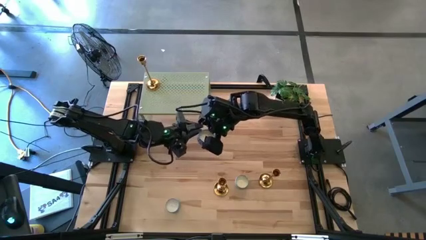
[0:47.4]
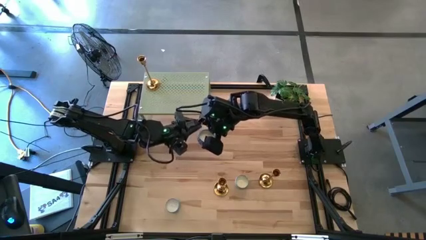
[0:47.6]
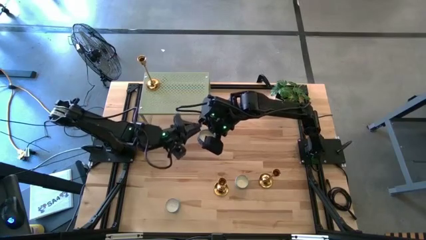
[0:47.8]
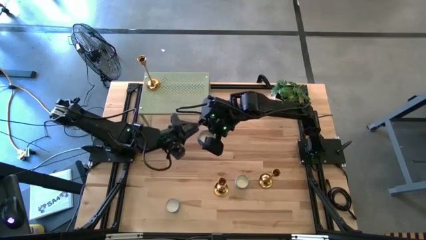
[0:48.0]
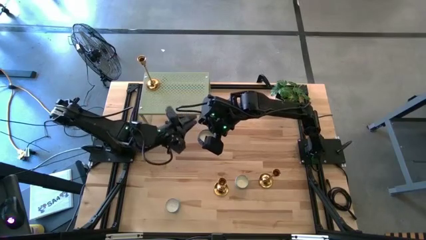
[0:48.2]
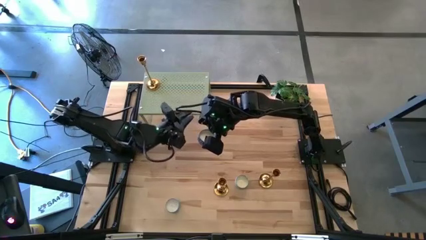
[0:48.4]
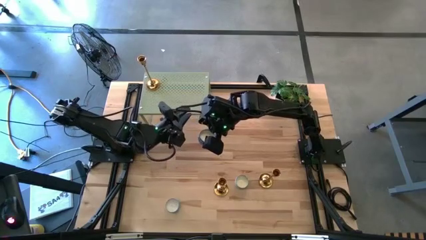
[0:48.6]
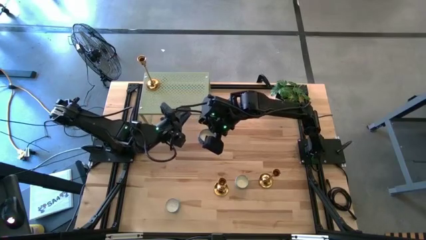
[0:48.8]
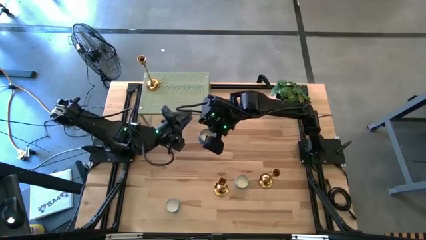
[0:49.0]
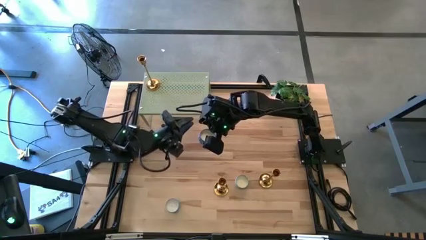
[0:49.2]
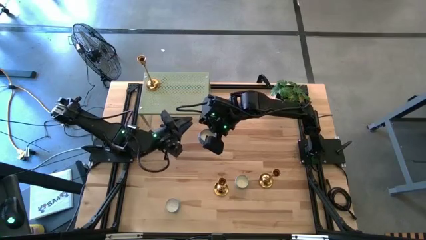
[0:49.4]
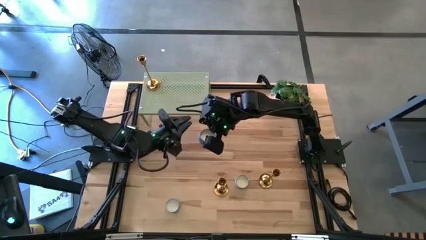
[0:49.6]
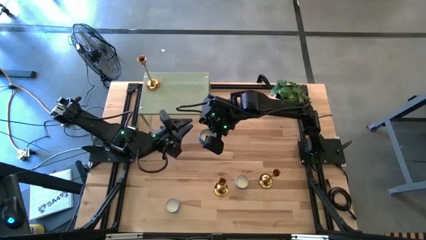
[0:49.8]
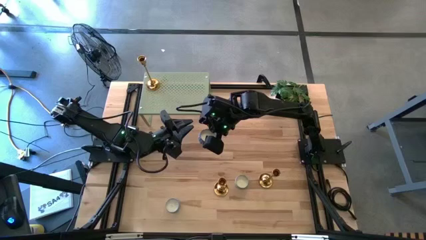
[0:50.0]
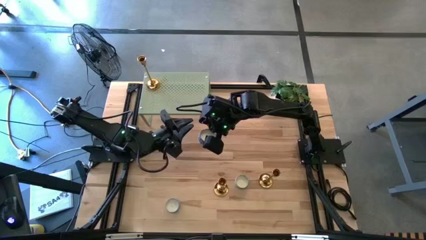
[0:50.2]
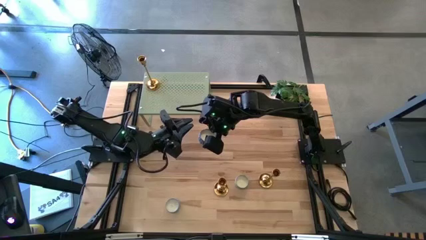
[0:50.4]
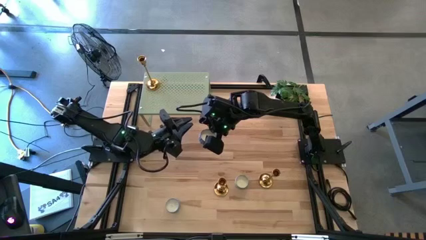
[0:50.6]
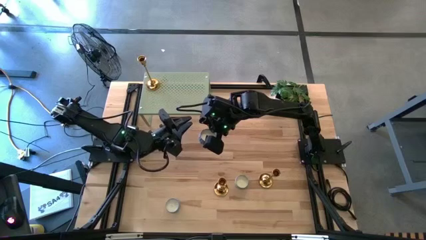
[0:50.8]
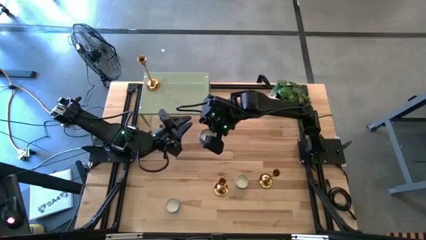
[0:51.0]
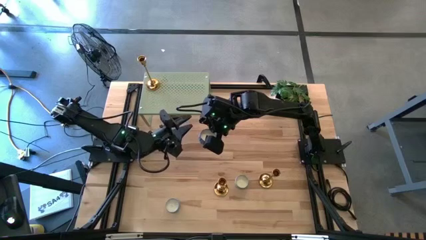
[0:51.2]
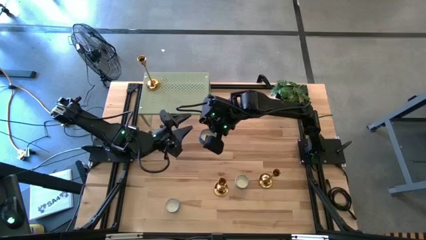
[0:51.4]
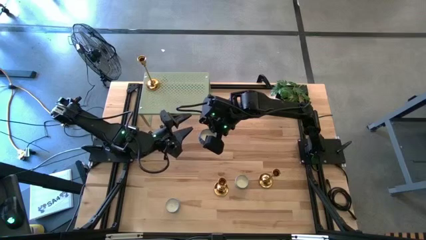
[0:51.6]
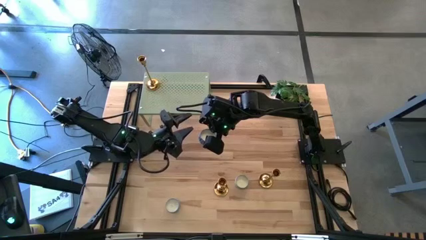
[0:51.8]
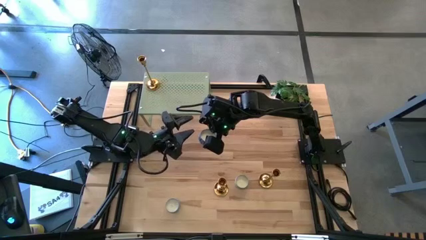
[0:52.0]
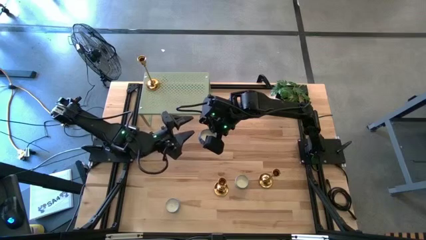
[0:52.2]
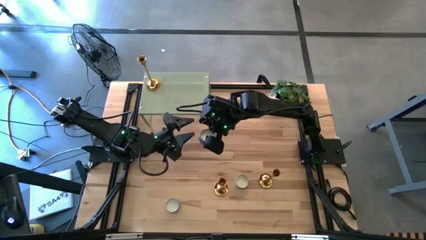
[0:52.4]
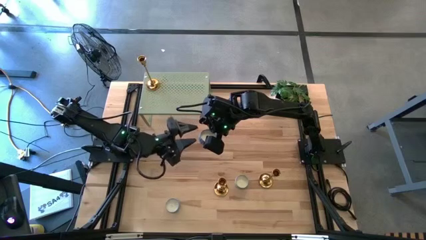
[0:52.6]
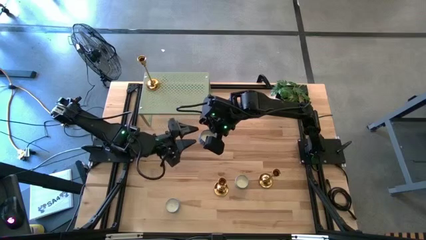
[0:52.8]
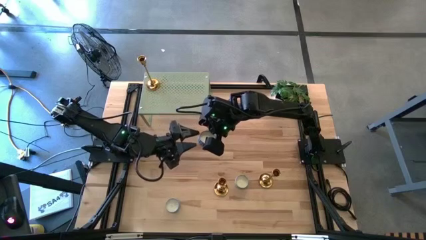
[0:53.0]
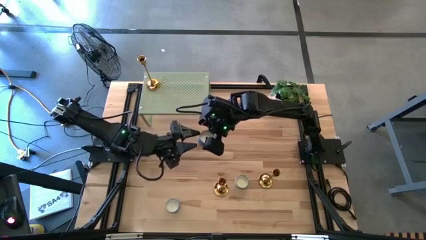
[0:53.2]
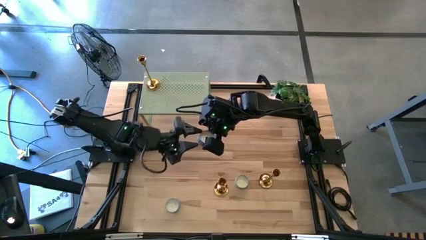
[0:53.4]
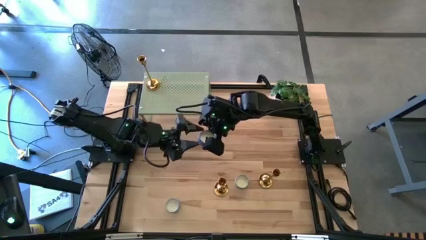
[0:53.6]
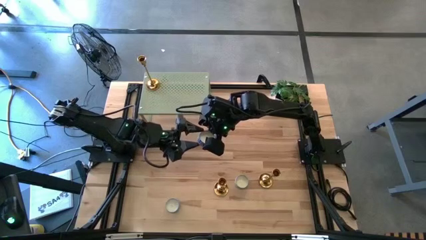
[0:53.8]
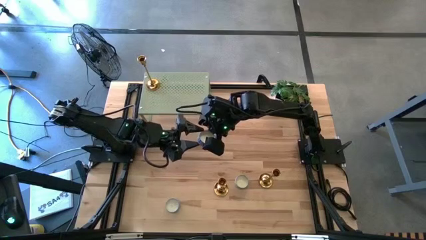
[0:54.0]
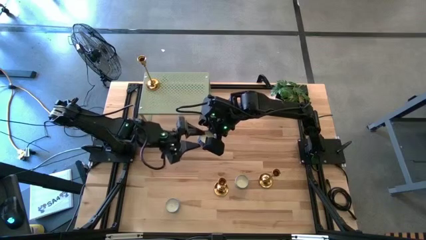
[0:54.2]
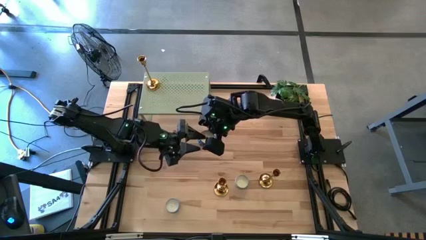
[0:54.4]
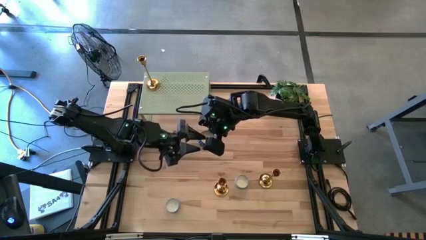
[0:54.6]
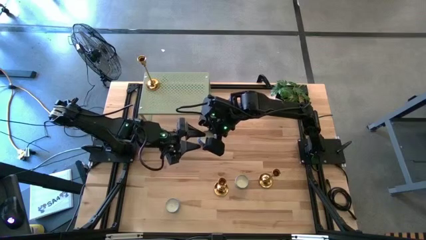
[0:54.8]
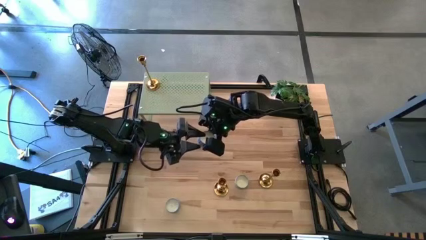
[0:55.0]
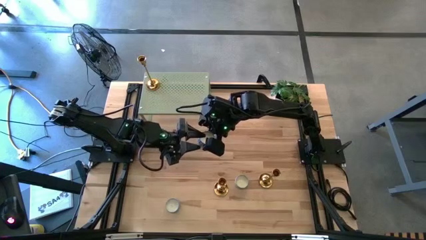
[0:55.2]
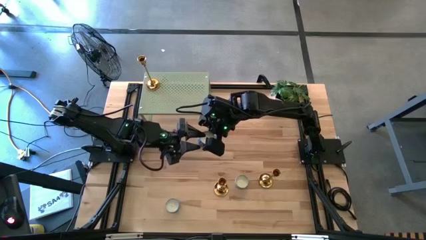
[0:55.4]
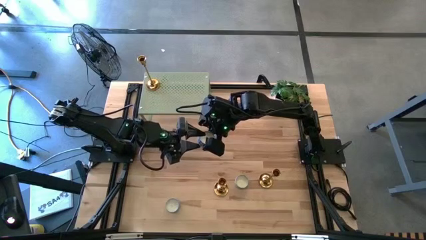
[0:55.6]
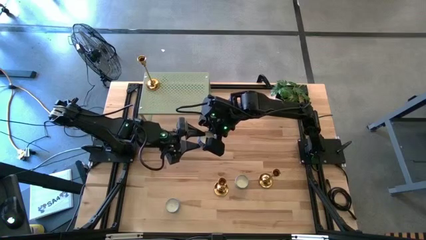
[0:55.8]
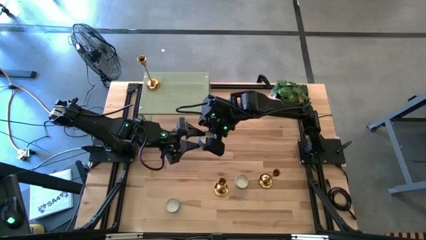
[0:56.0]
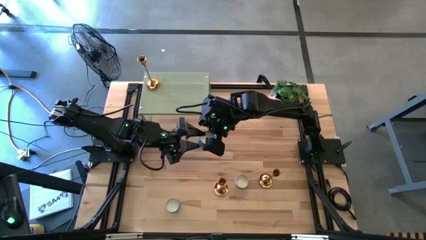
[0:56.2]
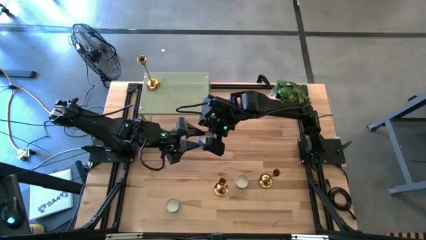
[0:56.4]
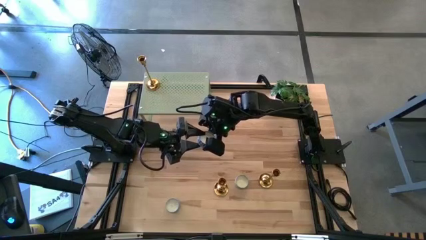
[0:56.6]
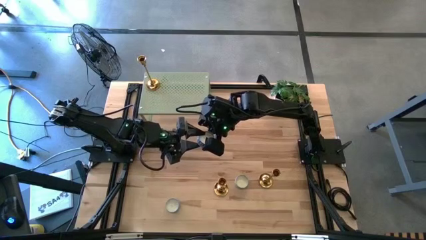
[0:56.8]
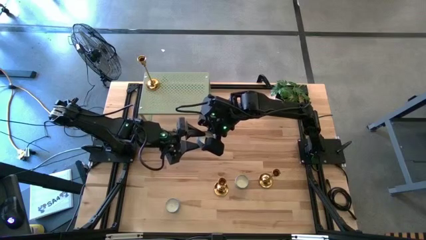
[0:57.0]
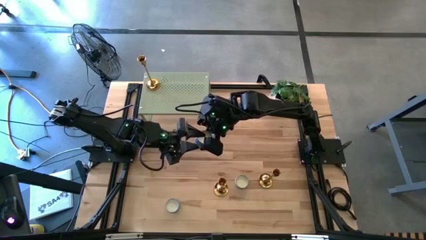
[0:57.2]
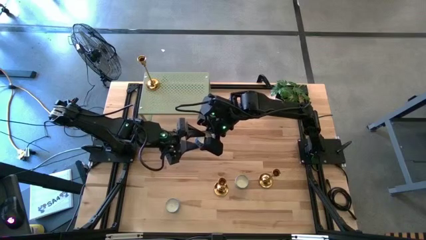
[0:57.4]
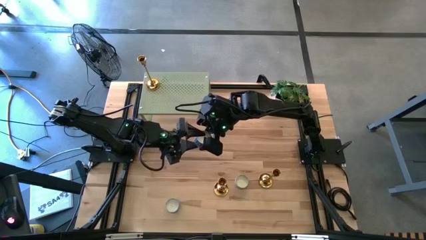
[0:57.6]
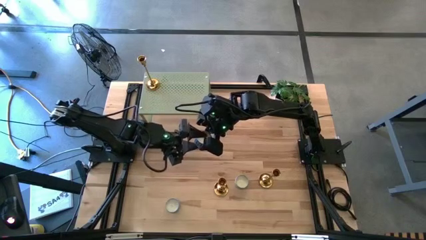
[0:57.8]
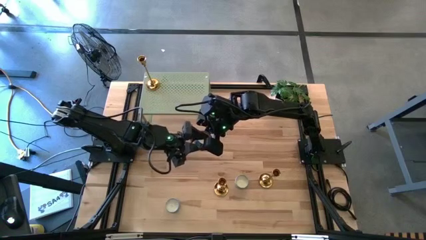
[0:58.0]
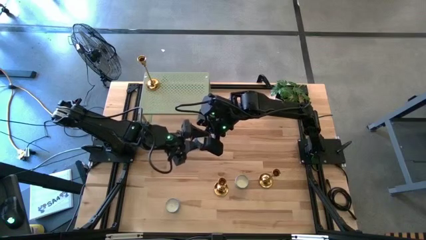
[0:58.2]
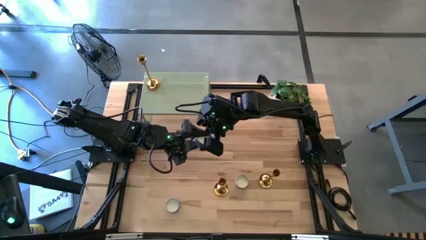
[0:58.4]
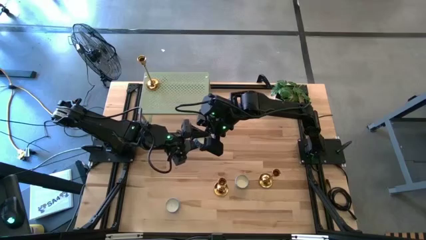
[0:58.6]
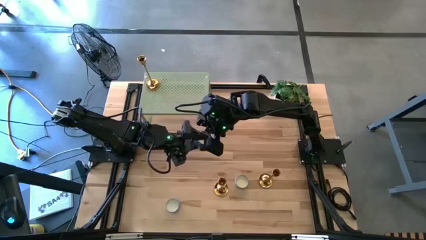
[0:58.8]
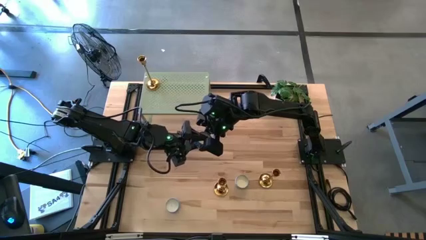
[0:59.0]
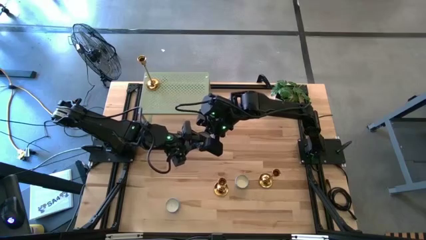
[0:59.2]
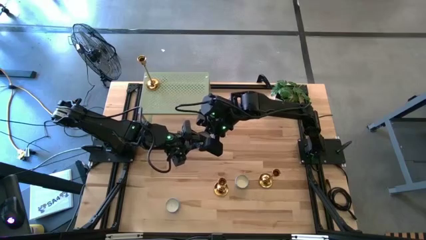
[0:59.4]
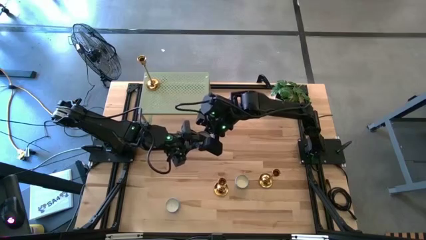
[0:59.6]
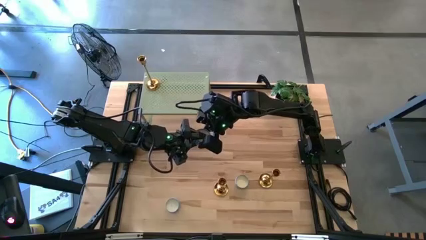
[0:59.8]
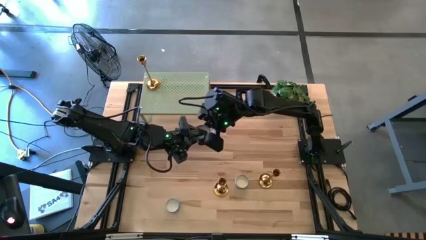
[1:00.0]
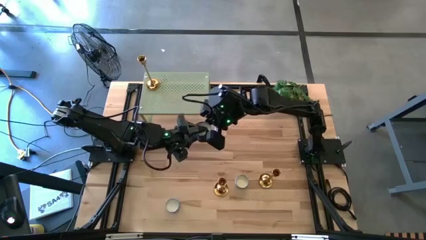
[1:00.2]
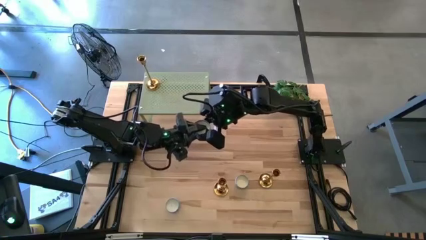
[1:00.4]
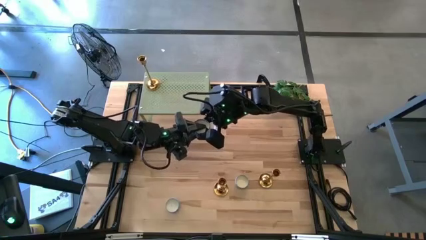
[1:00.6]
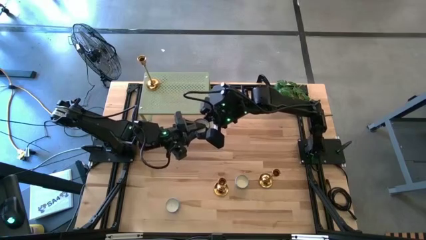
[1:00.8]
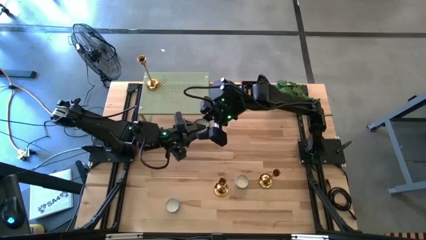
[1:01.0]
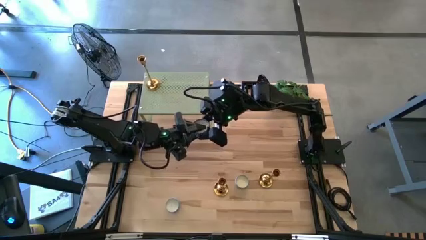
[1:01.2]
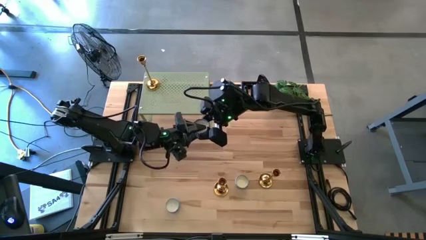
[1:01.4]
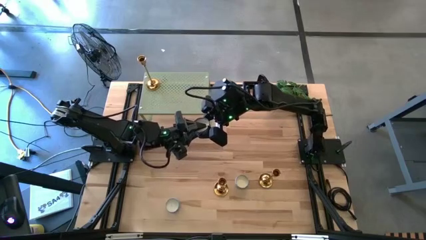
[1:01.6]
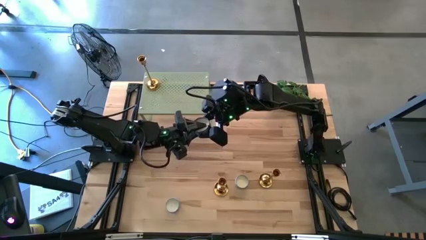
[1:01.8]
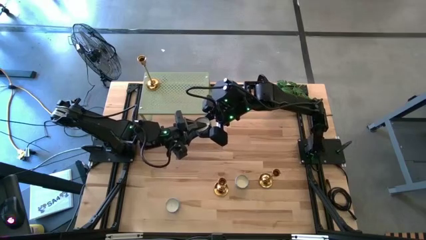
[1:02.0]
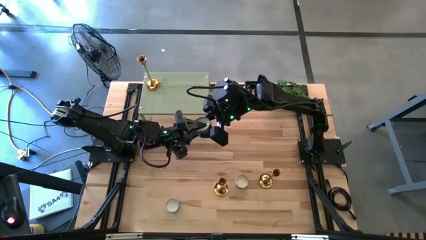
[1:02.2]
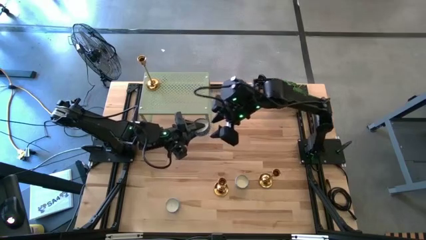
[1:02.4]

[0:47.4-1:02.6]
Task: Pick & Place candle stick holders
Put the top right blue patterned round candle on the shelf

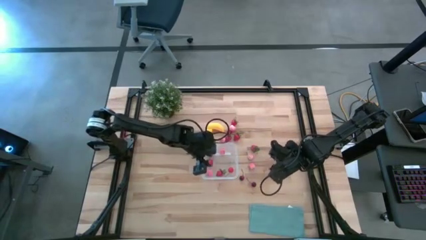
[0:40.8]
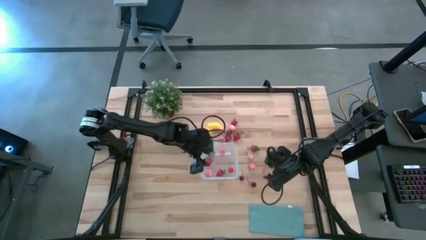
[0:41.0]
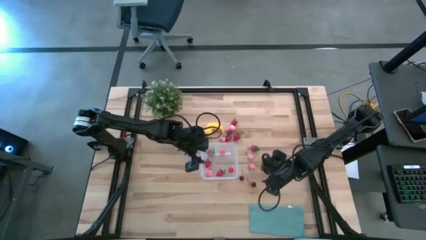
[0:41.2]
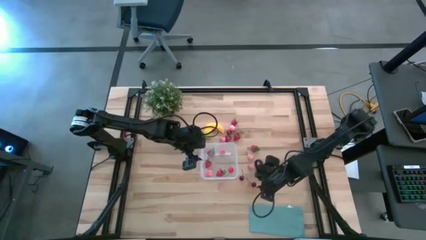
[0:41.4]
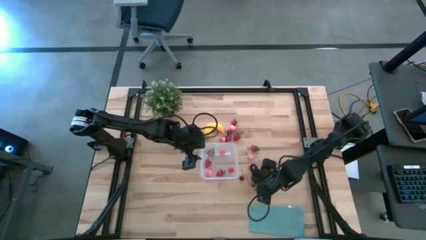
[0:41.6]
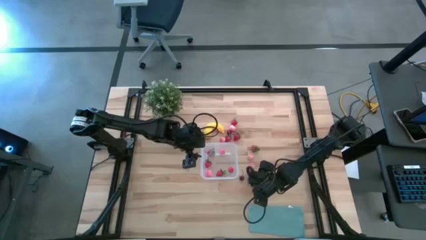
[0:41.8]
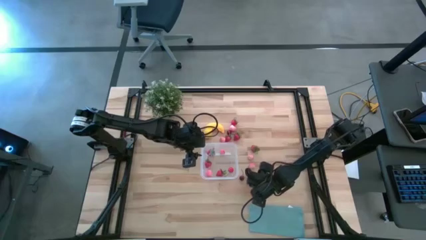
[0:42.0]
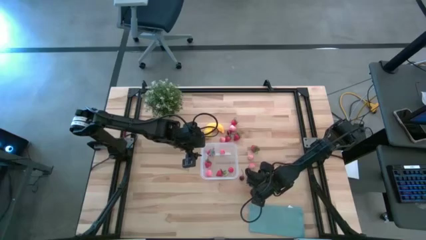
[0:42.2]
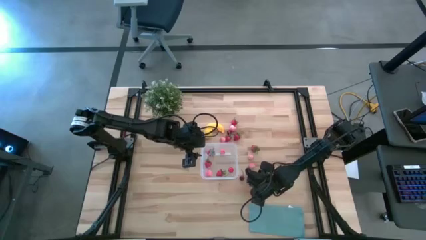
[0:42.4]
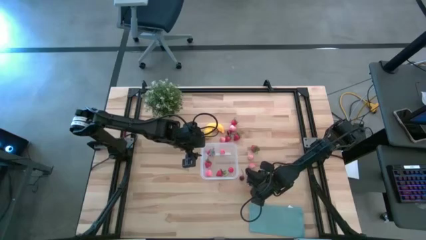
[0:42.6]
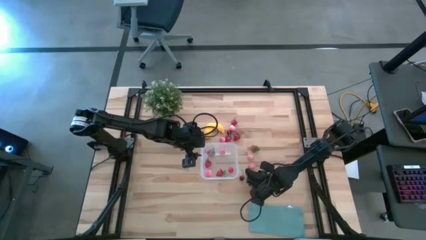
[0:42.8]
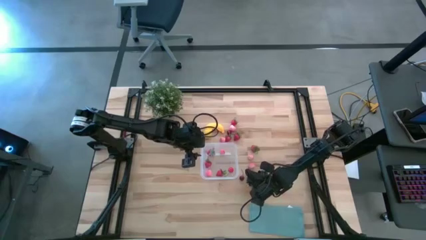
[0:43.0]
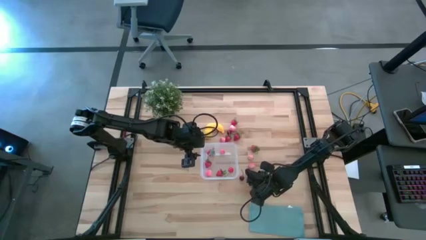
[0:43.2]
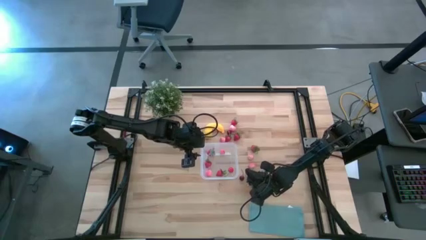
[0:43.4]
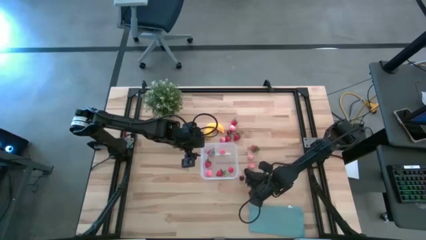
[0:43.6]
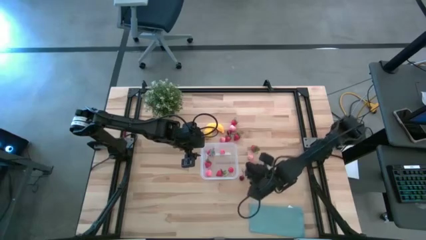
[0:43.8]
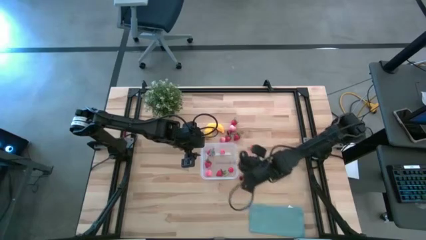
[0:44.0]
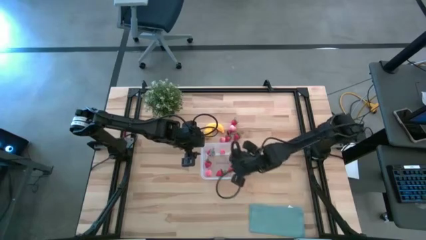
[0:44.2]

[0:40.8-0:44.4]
Task: Pick and placing Produce into tupperware
Put the red cherry into the transparent container
